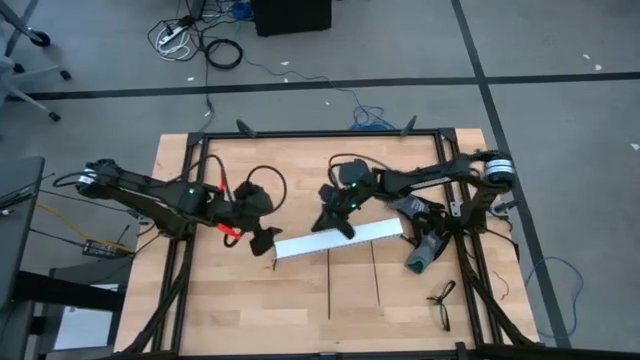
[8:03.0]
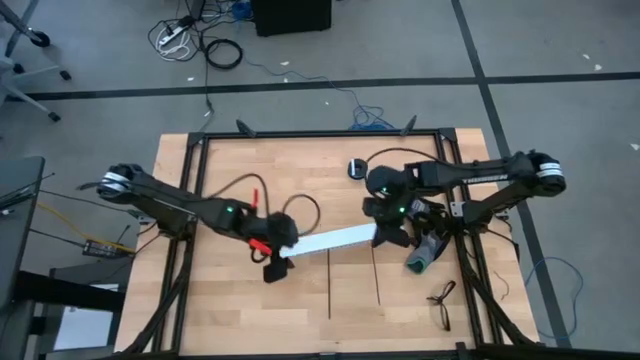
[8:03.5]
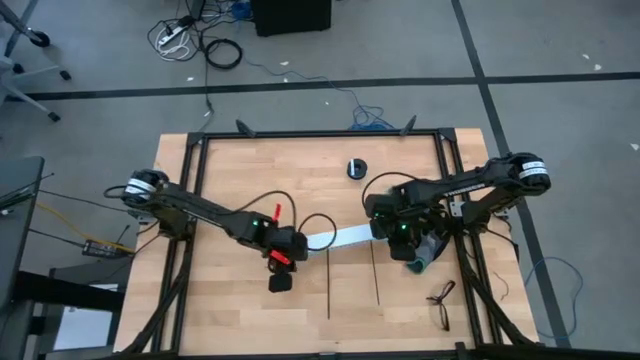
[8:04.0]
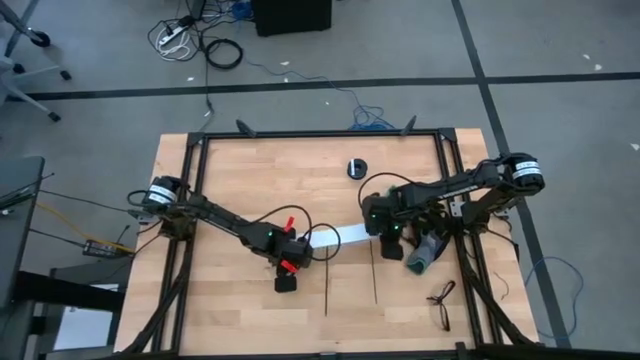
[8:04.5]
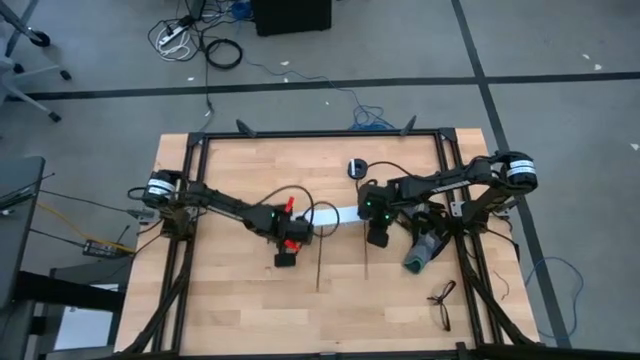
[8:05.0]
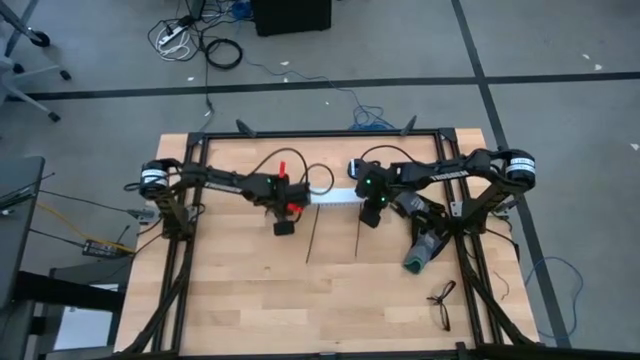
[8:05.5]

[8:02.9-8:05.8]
Task: Ziptie cables
Move the white cable duct to the top center of the table

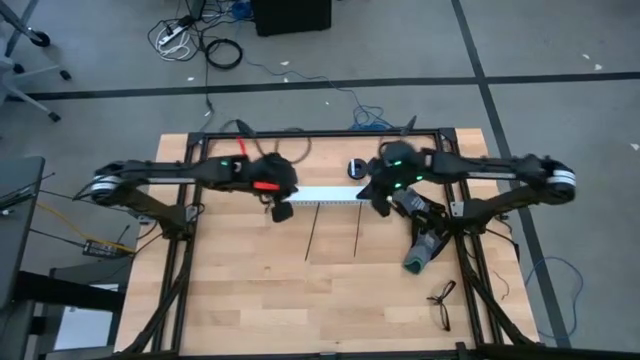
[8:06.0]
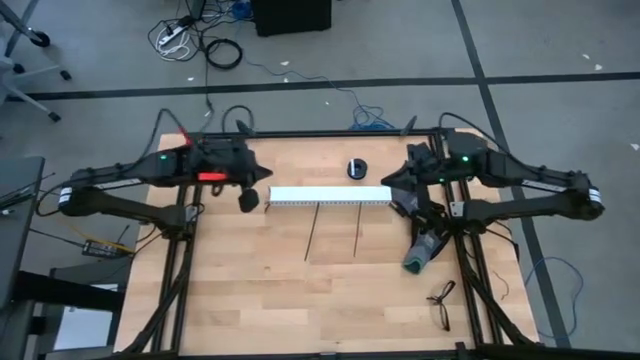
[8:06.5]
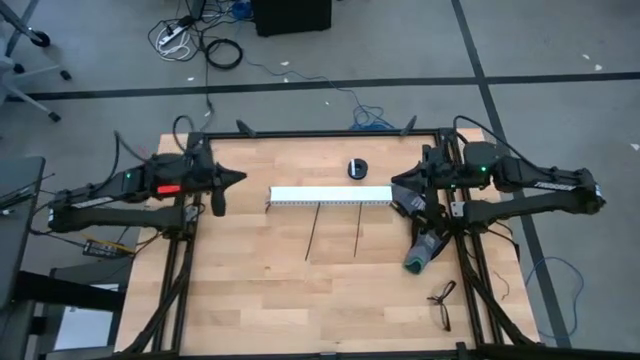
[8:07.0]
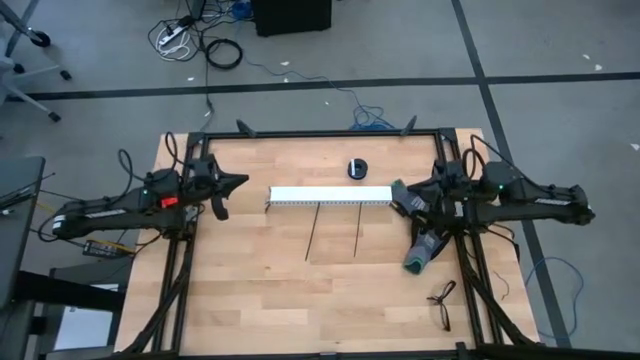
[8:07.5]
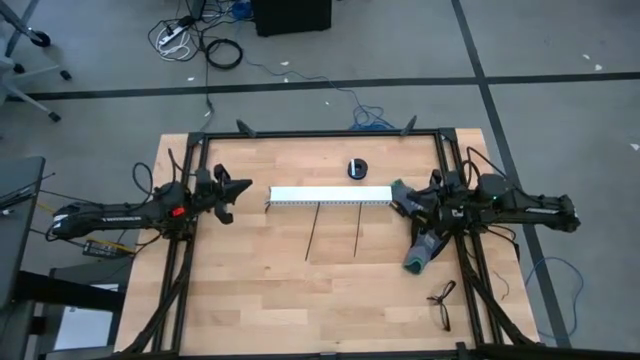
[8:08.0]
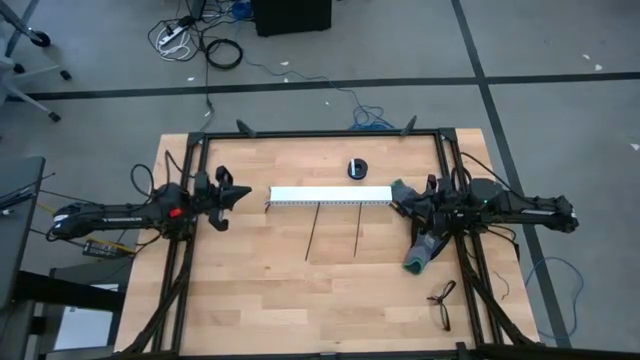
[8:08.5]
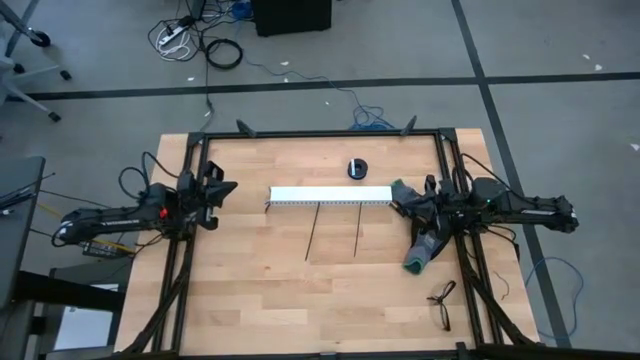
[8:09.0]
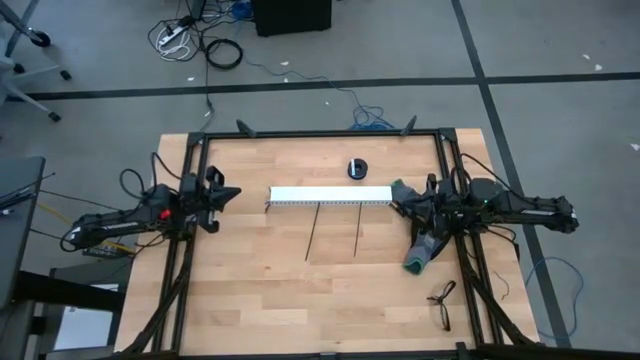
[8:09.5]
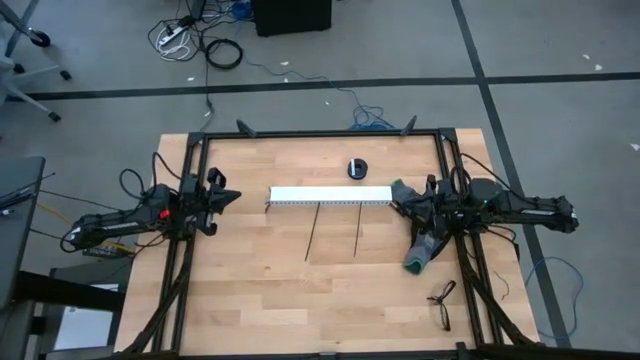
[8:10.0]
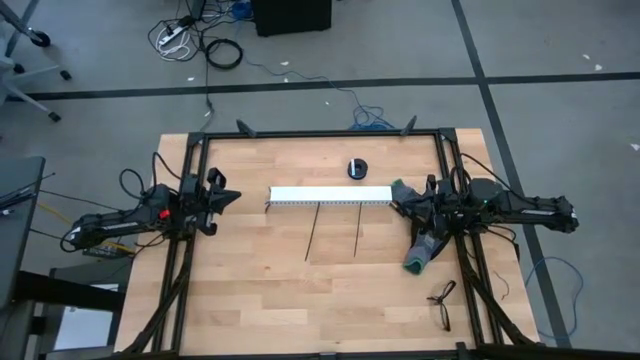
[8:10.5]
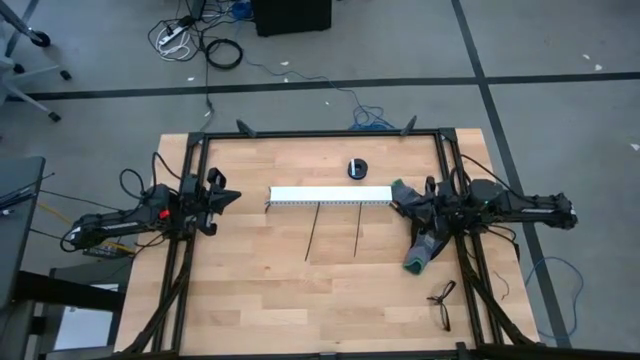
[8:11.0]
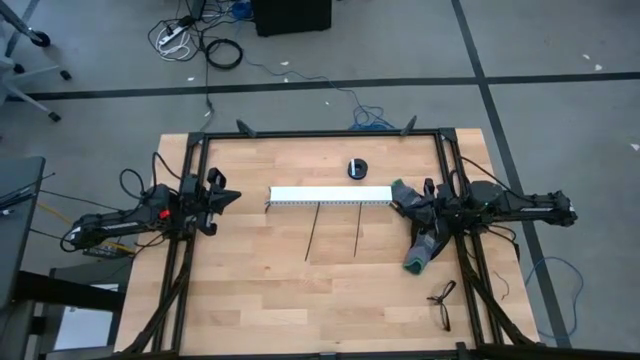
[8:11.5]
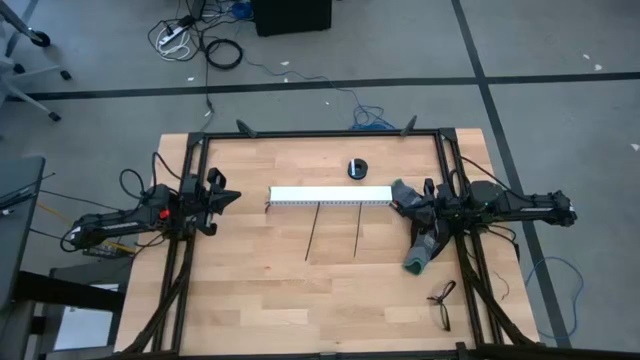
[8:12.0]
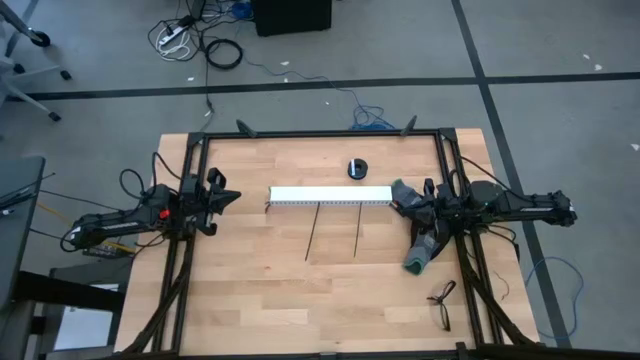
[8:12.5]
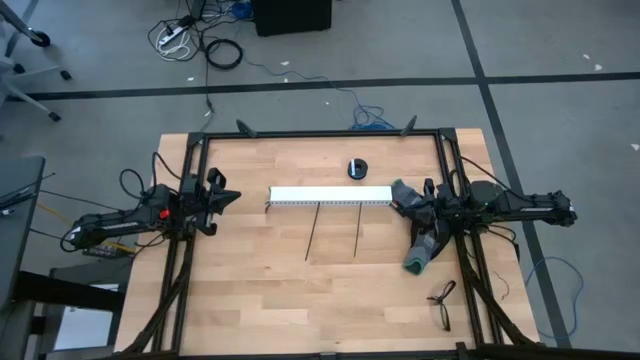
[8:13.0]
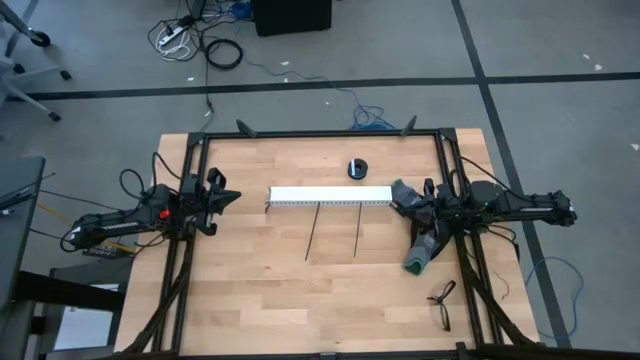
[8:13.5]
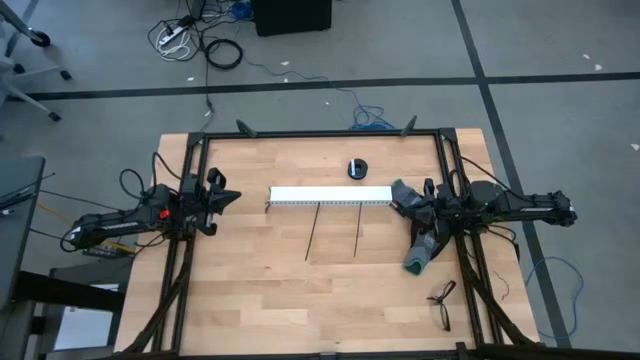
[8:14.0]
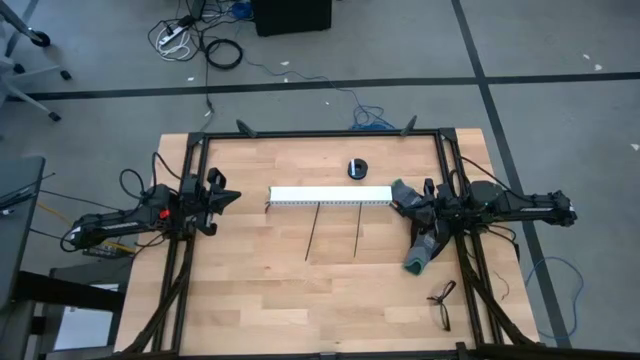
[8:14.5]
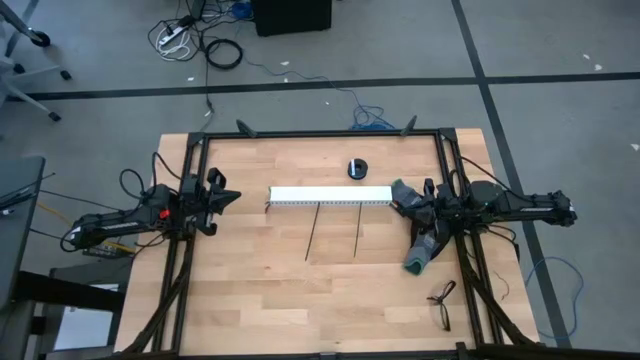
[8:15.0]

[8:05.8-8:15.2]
Return to Home Position

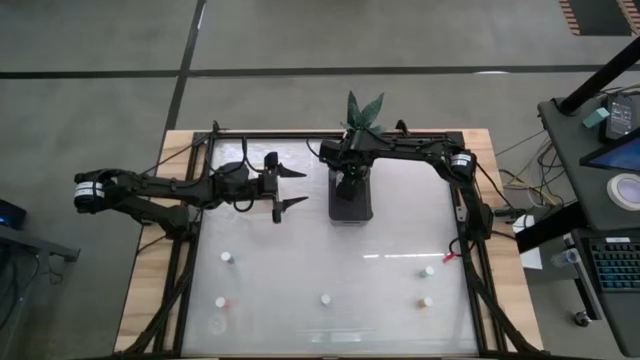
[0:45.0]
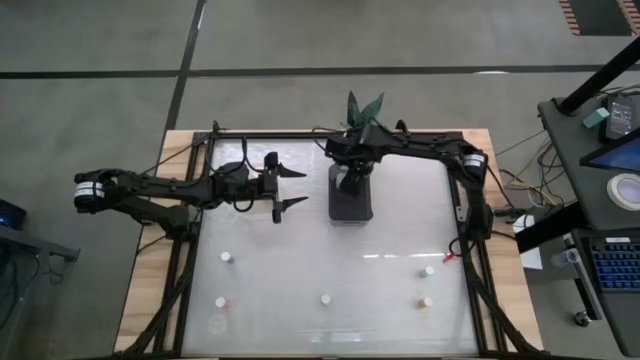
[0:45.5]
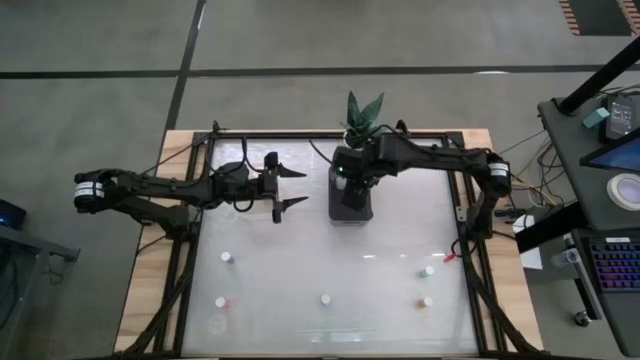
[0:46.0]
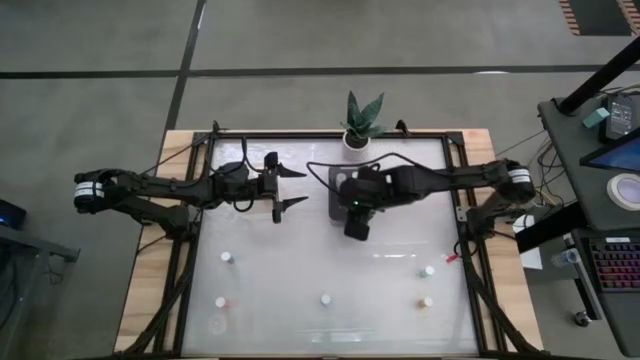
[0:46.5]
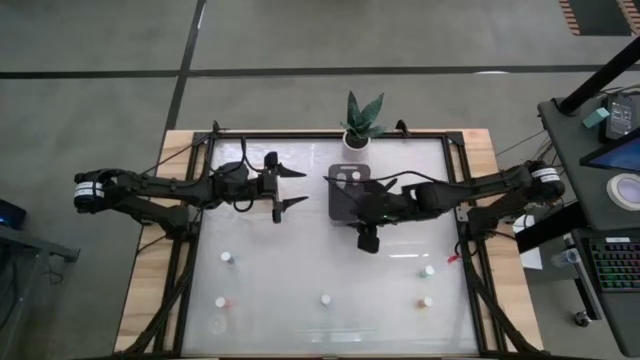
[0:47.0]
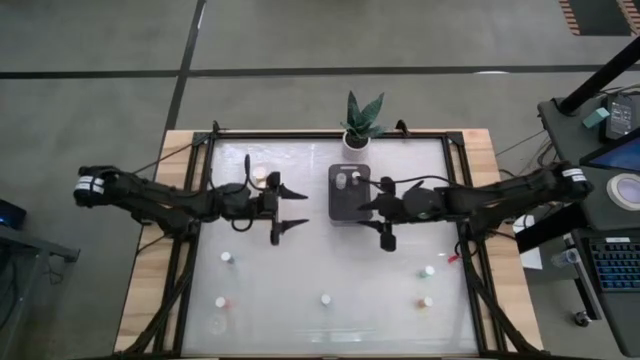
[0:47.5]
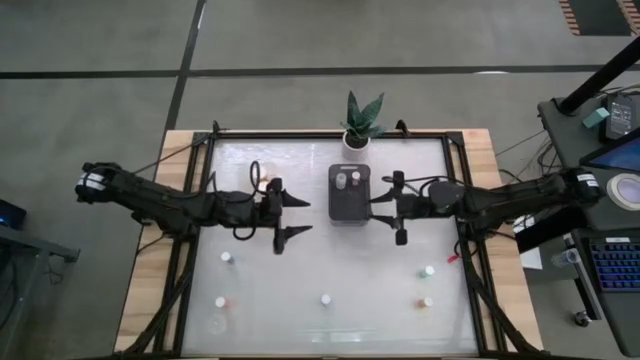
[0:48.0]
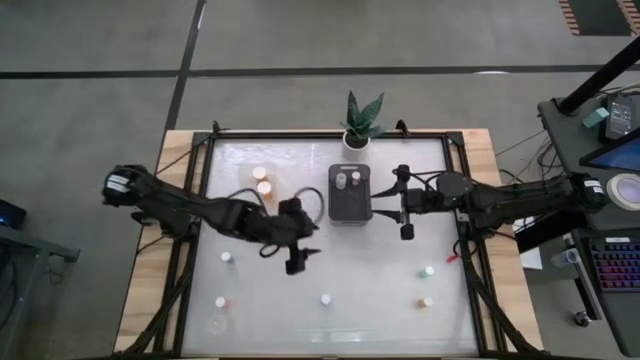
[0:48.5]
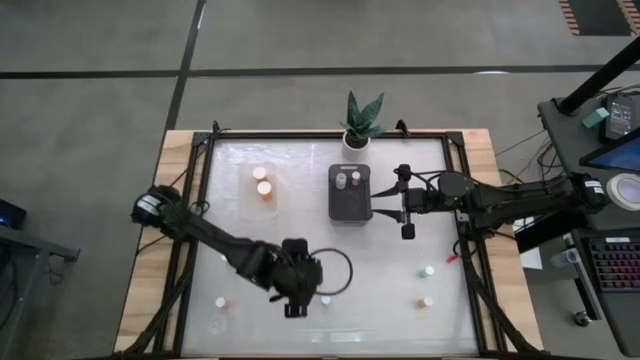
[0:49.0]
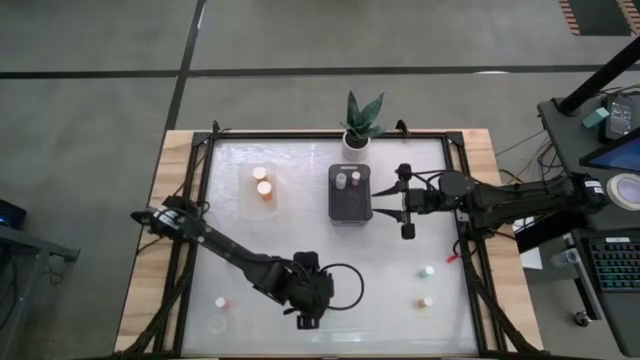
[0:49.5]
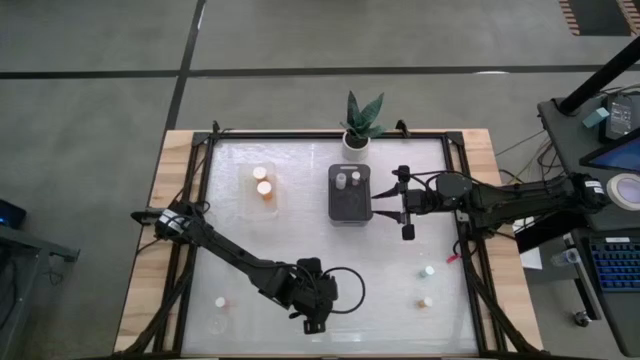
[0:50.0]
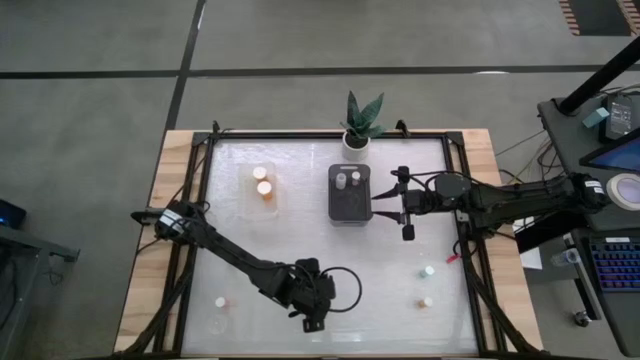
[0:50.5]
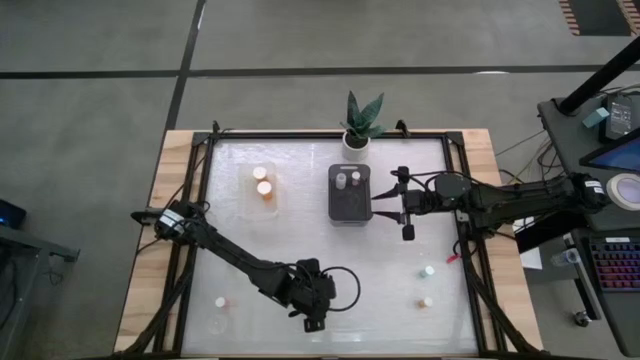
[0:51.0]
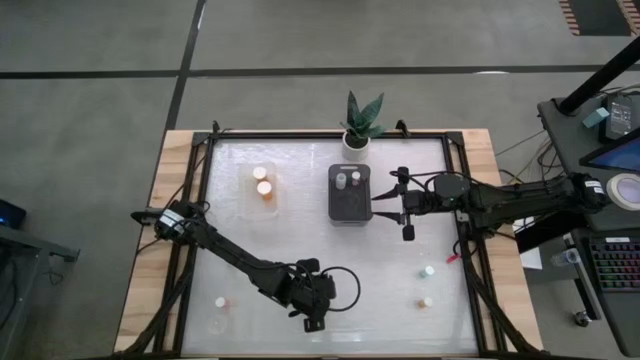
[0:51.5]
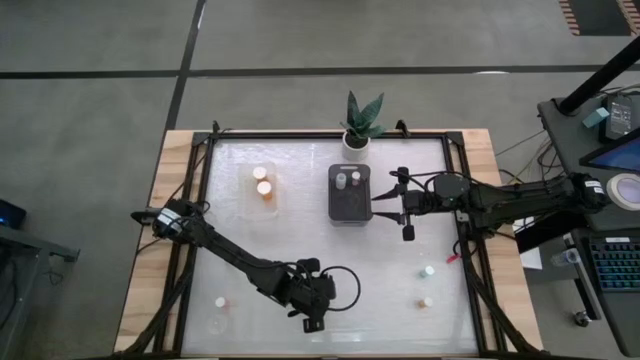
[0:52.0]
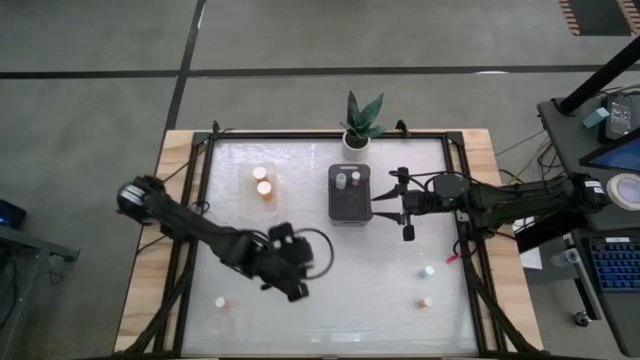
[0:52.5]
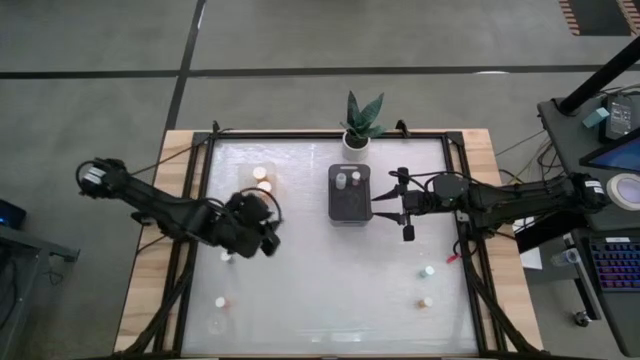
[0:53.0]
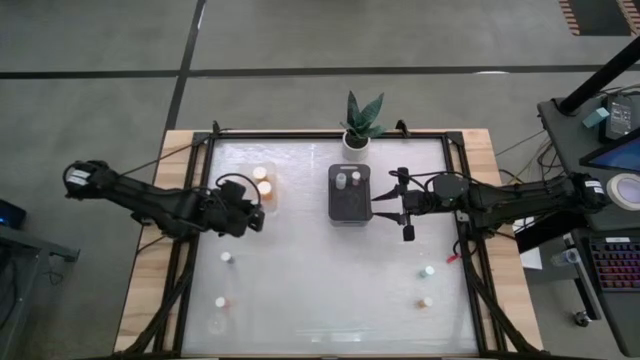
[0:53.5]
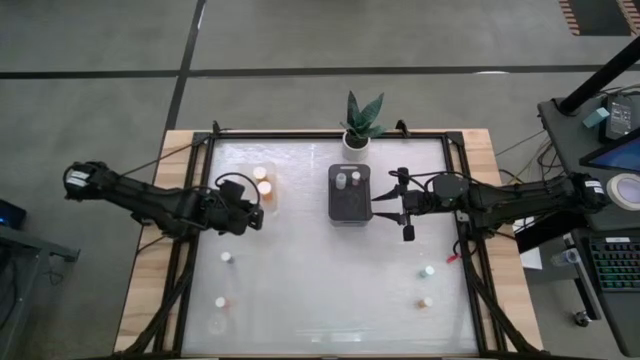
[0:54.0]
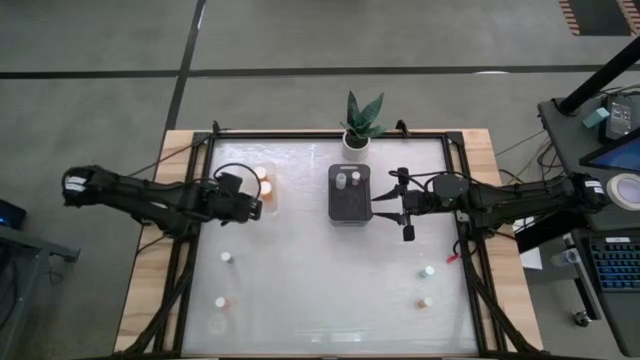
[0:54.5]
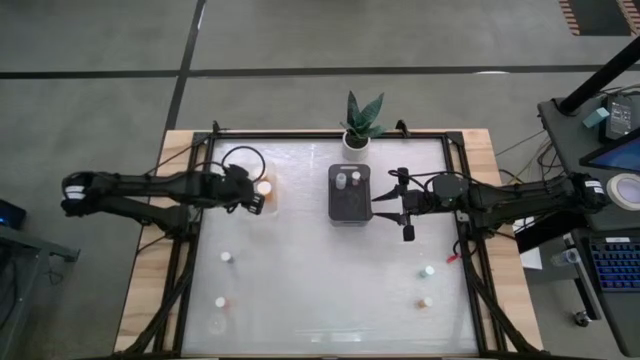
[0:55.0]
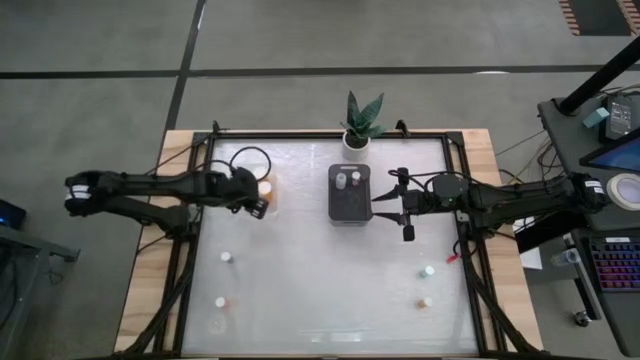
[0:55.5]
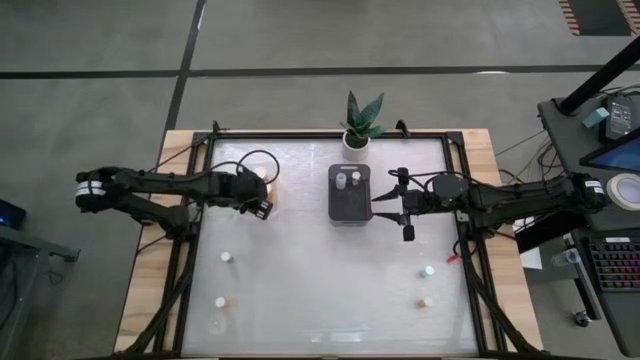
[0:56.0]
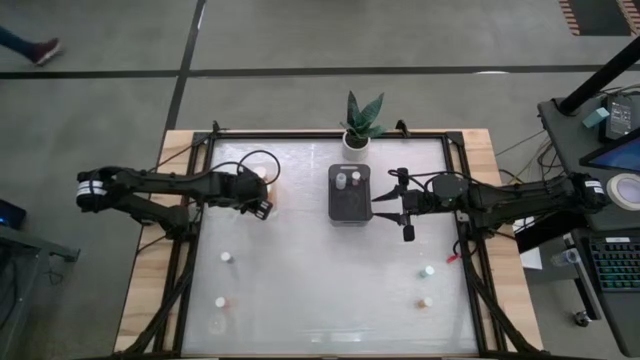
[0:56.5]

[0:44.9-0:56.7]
Task: Pick and place medicine bottles into bin by pill shape (circle, oval)
Put the bottom center blue pill bottle into the transparent bin
